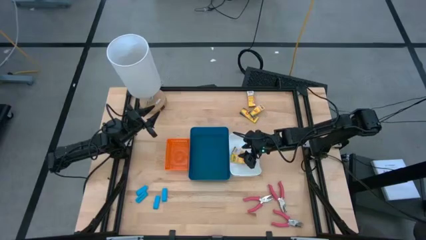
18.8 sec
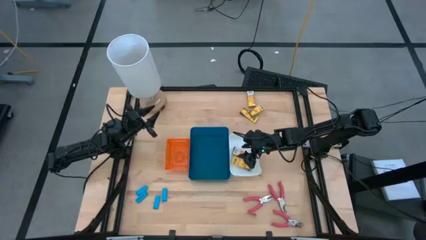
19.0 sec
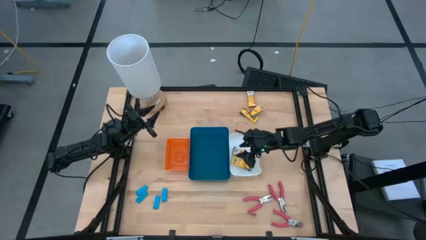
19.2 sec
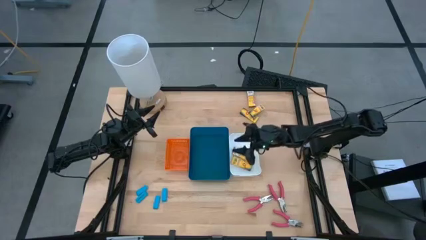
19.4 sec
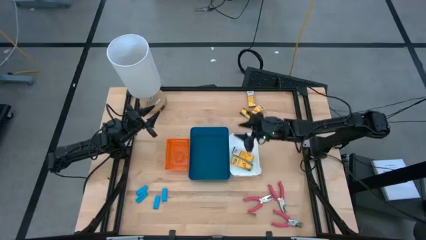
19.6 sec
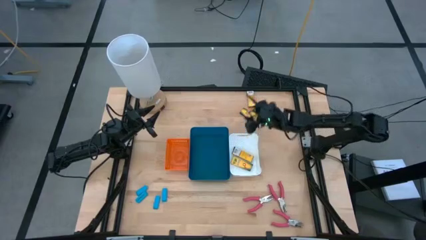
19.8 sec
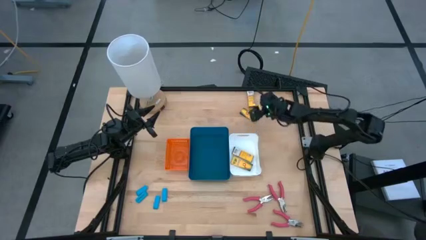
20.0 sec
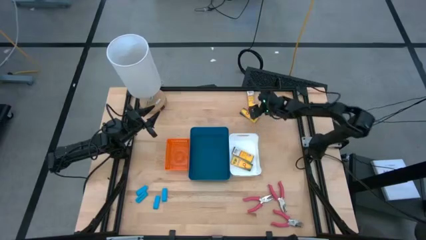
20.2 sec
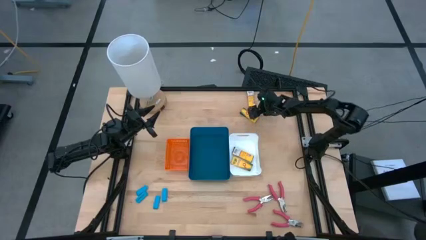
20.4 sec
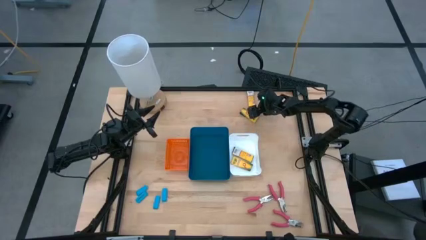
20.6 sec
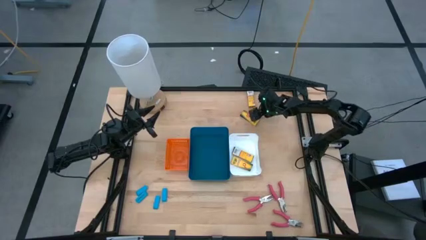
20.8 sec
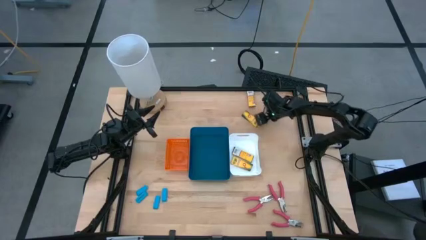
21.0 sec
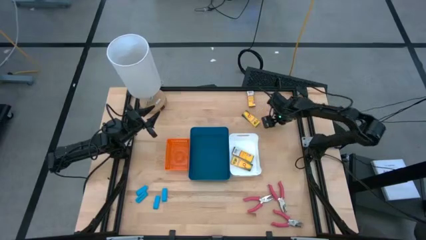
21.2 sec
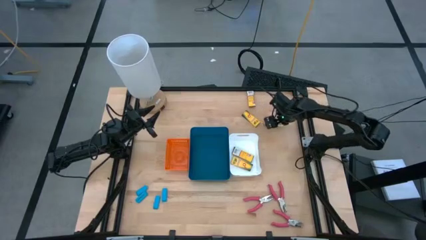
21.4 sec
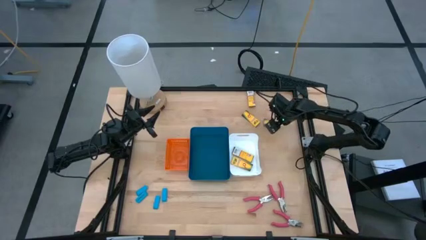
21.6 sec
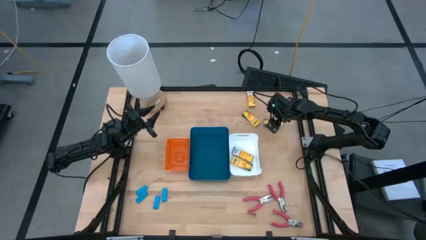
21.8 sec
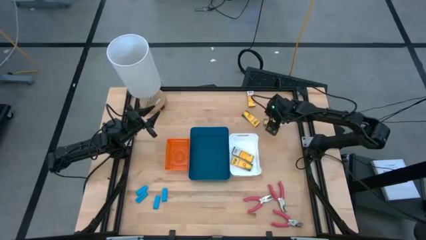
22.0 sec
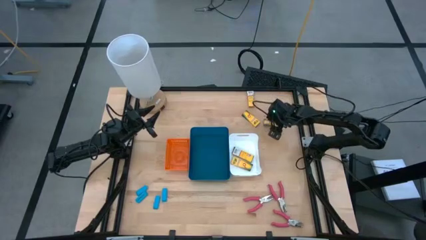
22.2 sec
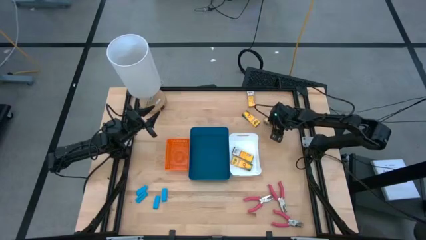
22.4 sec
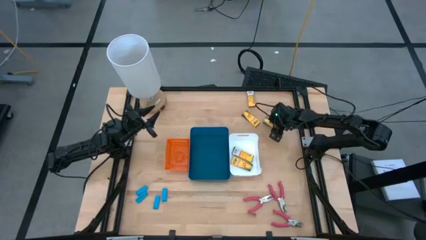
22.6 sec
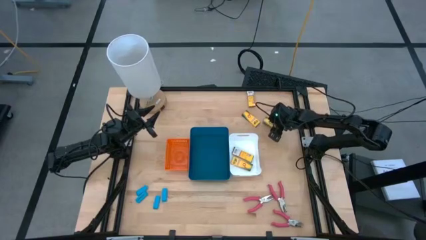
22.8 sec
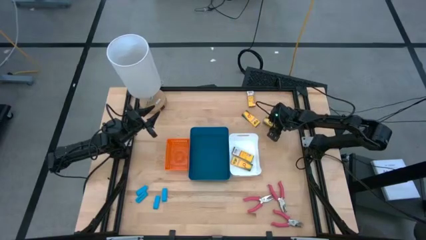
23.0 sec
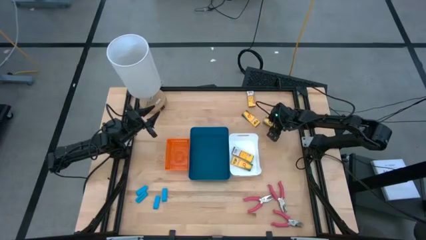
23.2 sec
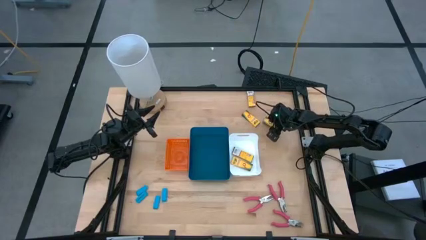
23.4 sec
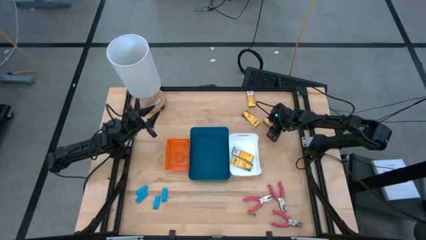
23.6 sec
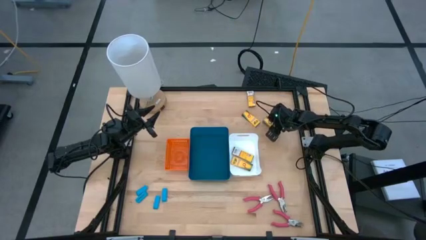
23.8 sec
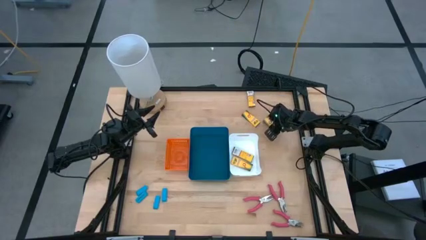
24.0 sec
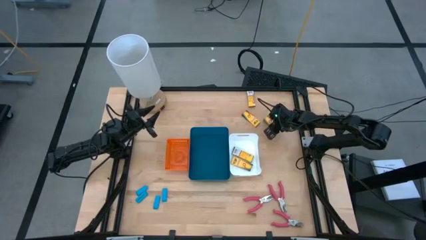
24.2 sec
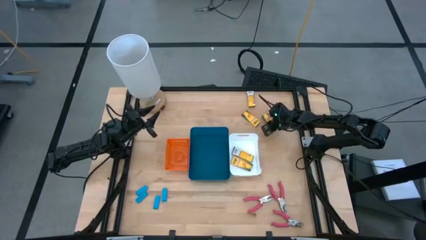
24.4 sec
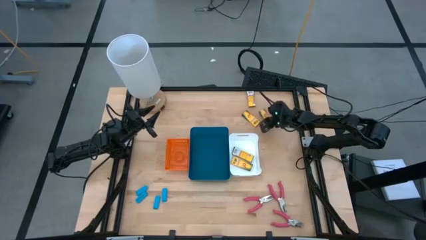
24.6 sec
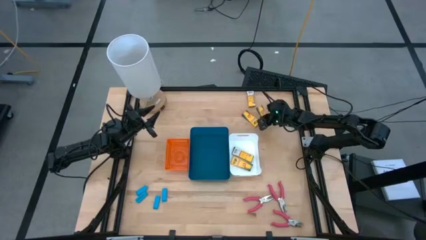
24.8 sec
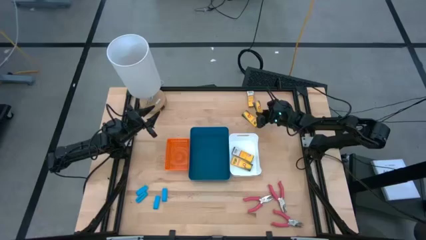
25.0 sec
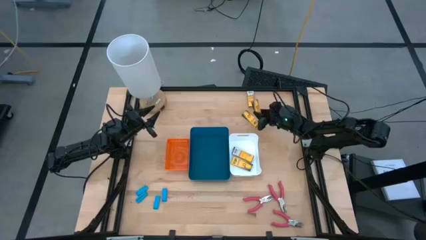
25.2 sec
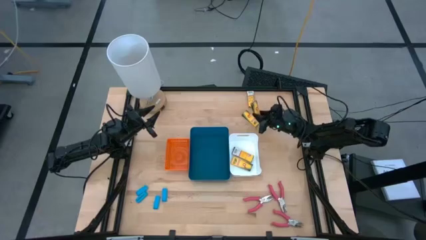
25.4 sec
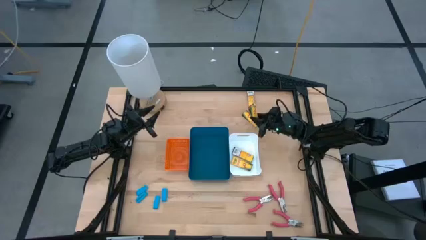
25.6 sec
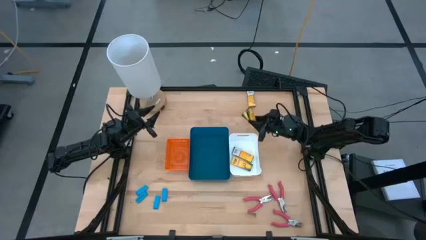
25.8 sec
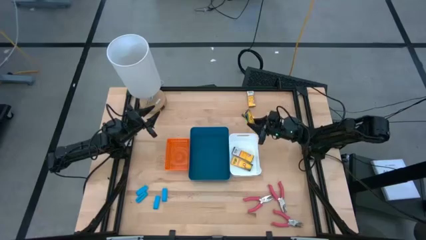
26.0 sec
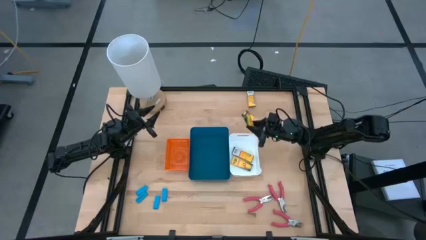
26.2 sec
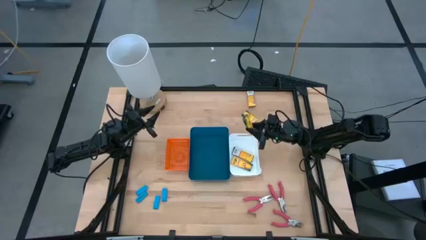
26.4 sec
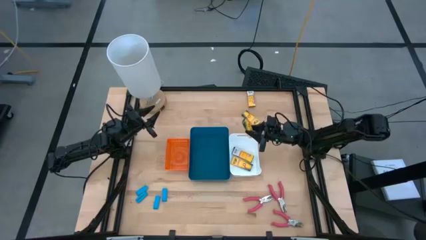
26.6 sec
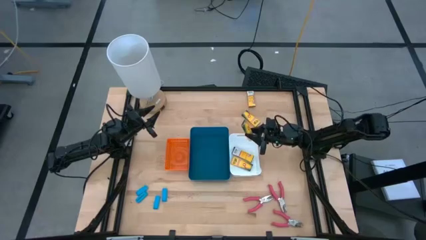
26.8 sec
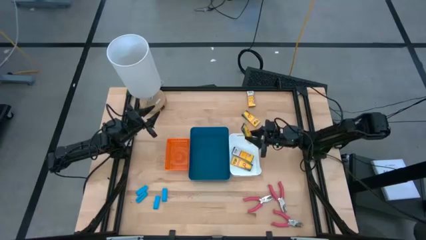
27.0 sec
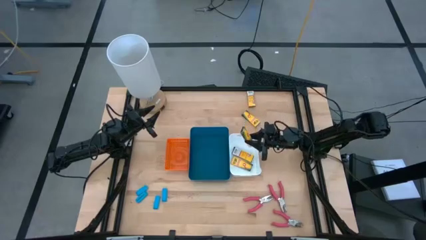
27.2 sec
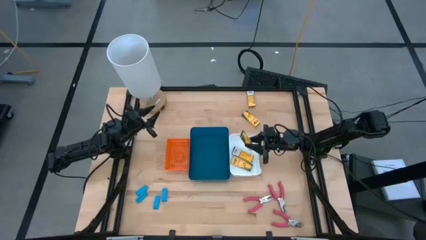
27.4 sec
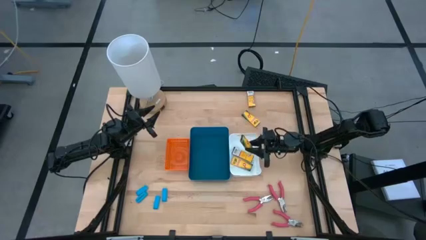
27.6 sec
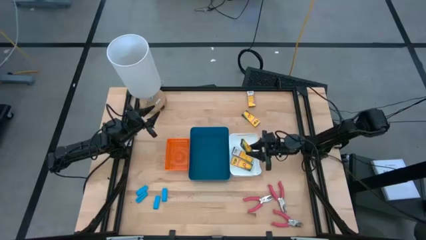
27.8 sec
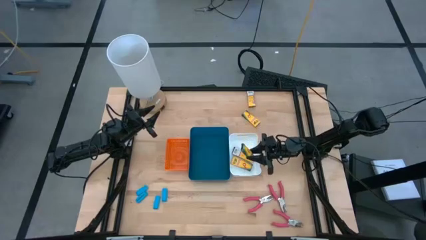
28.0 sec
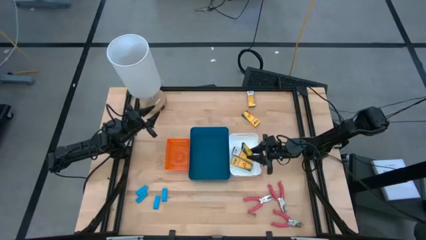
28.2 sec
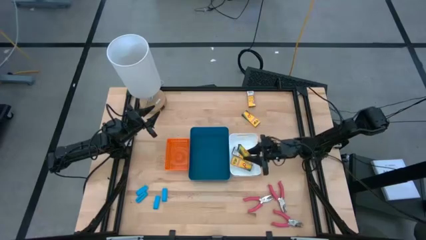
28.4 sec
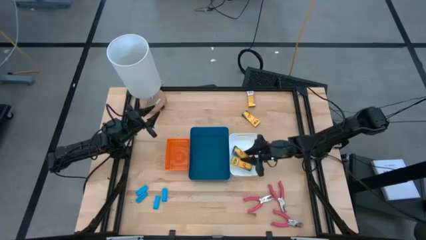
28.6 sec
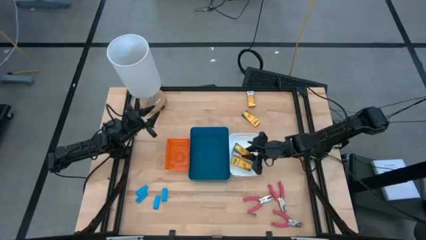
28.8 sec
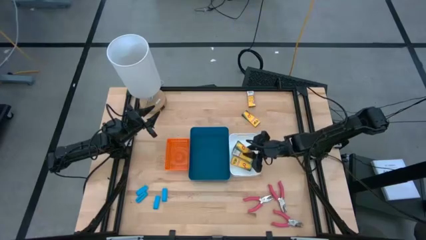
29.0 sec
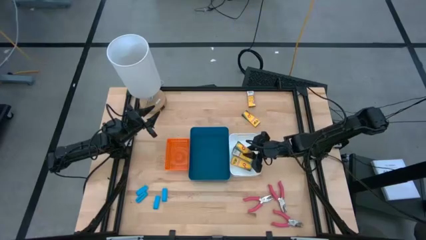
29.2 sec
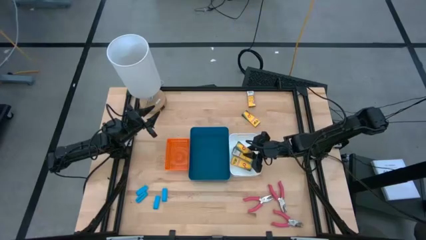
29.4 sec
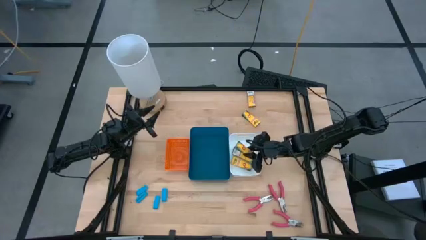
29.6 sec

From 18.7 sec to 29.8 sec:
Task: Pick & Place School Supplies
Put the yellow crayon box into the white bin

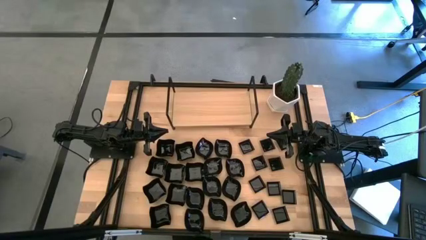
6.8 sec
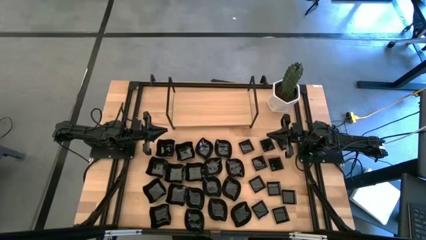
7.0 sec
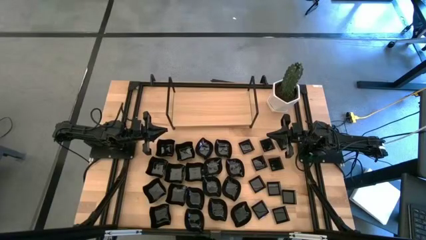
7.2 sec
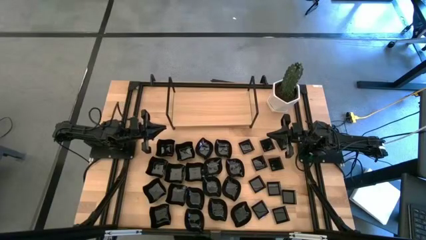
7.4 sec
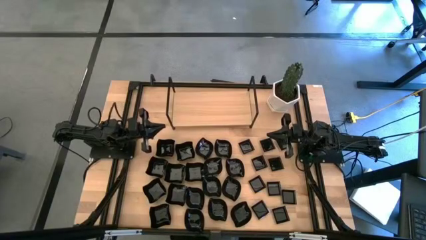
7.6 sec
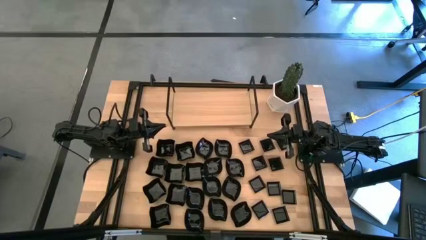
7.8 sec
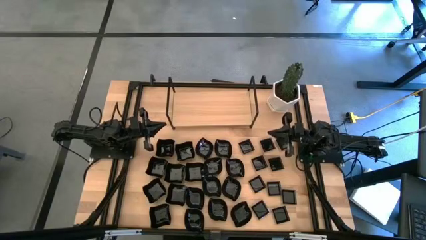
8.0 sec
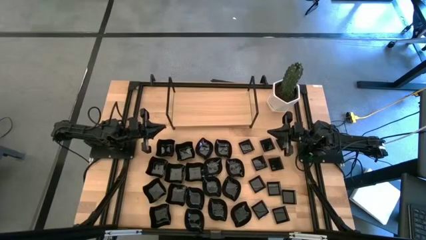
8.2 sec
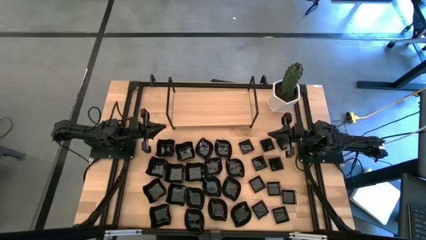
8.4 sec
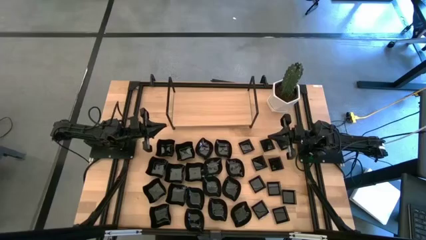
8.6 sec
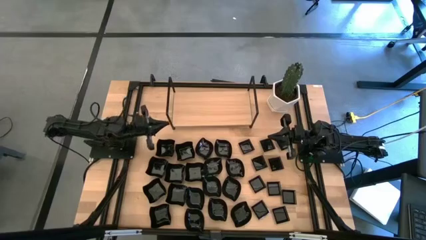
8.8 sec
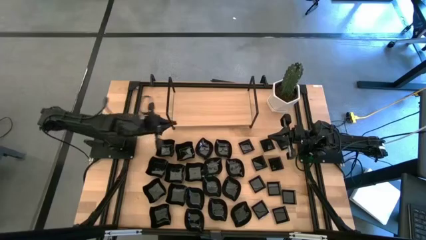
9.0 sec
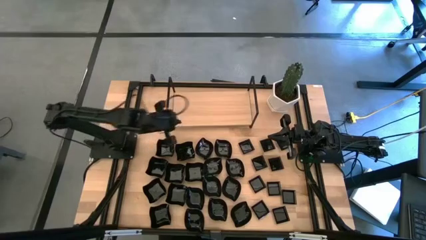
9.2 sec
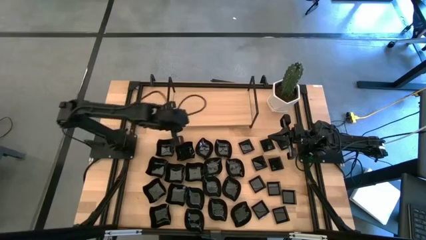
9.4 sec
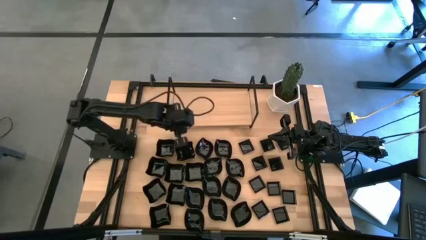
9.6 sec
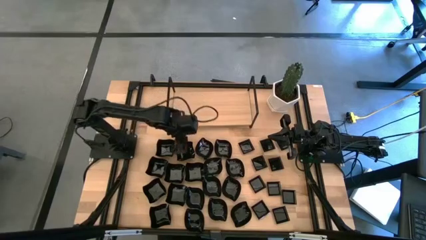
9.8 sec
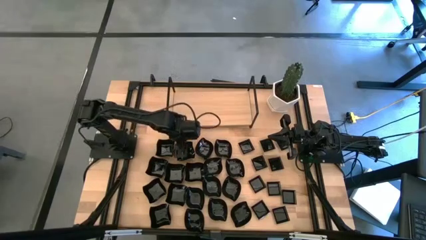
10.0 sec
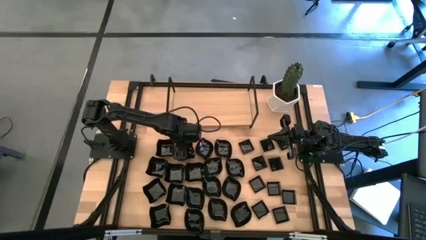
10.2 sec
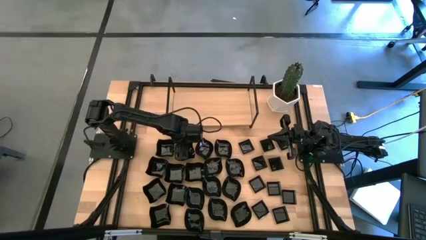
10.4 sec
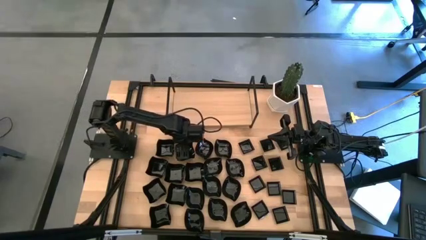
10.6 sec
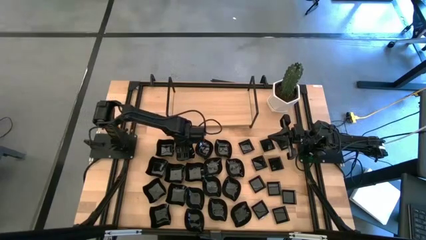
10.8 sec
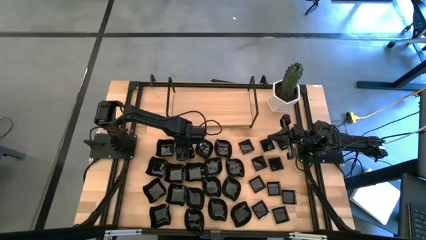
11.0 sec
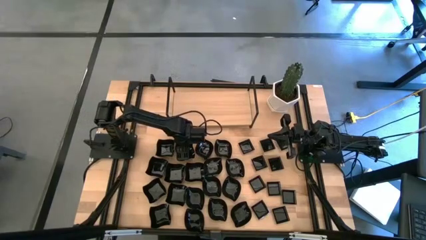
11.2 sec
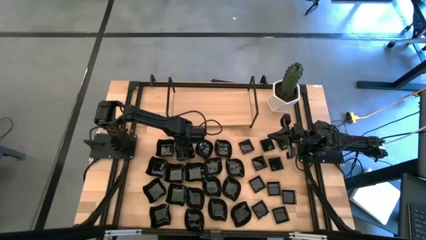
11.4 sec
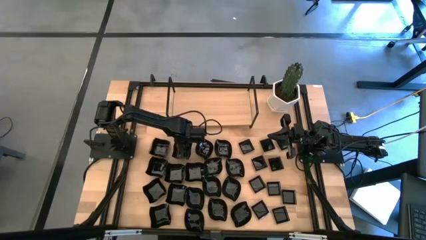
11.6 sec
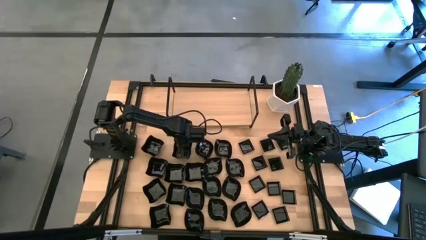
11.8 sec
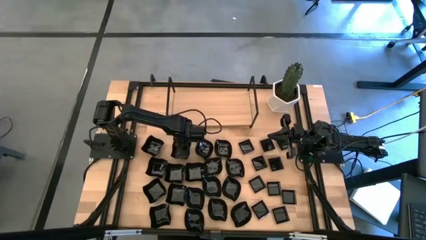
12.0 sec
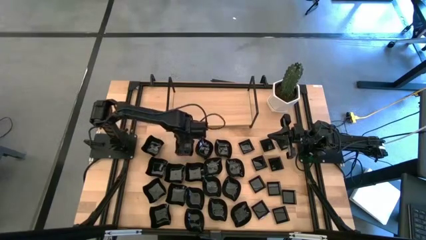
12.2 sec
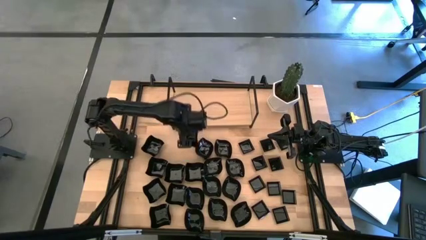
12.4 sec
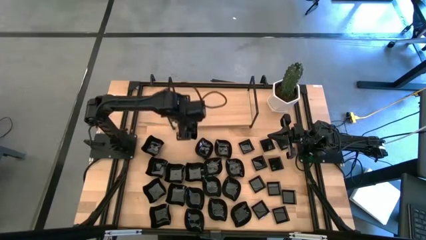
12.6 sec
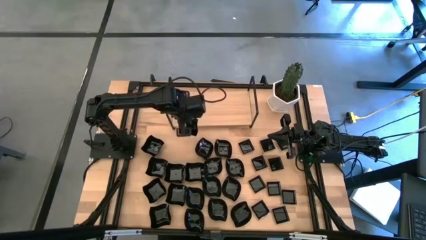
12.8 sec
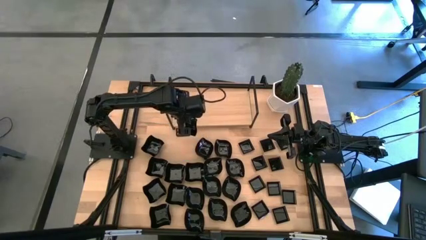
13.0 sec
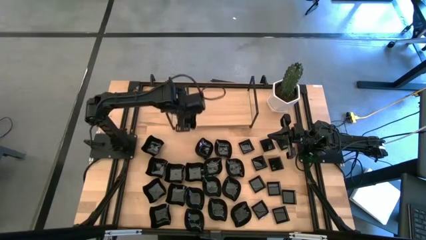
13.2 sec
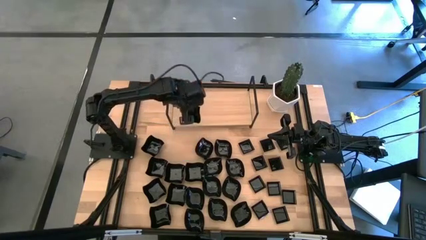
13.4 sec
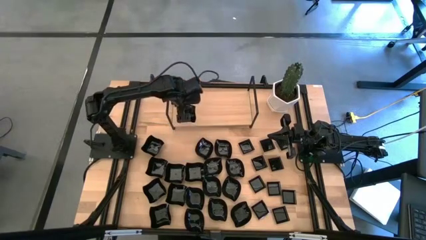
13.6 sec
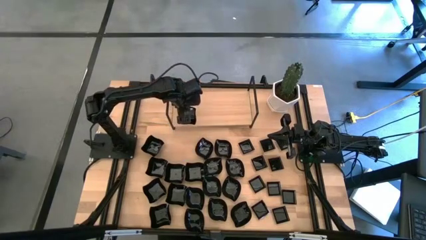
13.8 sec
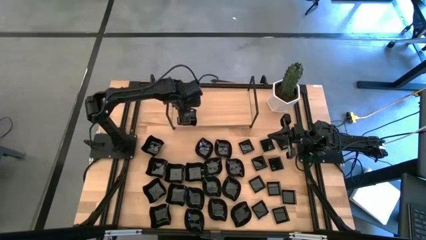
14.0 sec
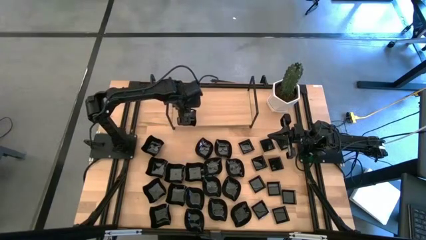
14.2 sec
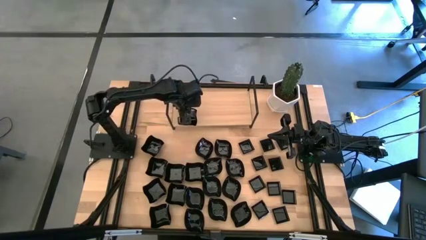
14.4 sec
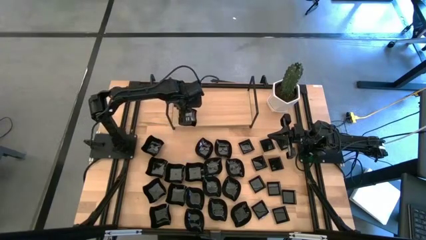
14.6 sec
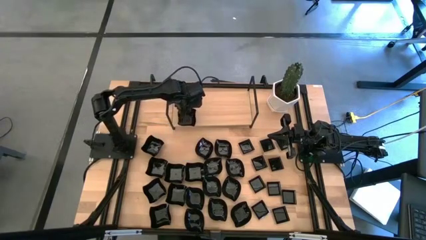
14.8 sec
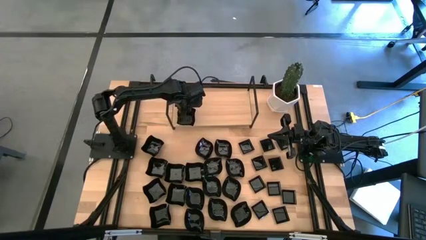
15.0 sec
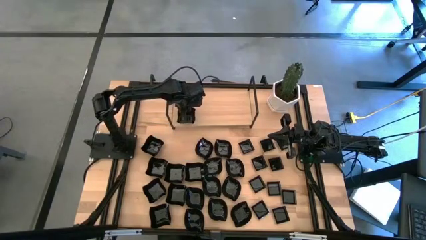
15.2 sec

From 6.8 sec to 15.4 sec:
Task: Pick & Place Mini shaped plates
Put the black distorted square plate on the shelf
